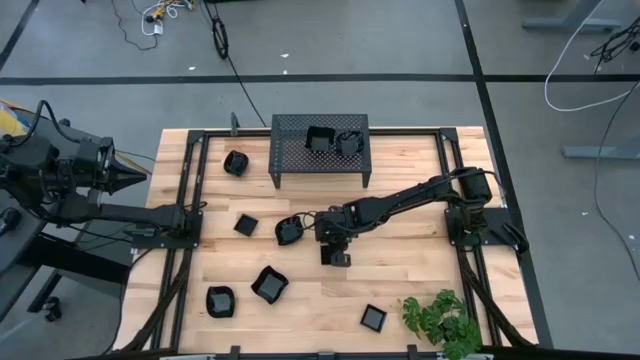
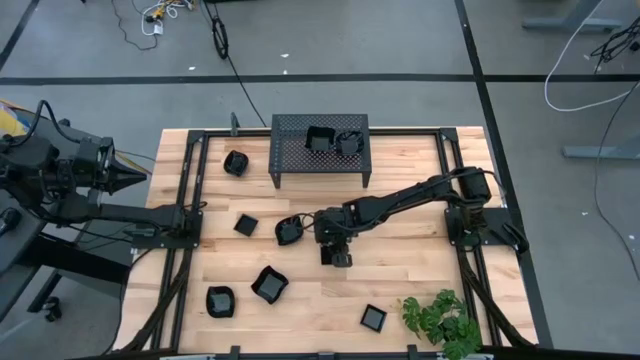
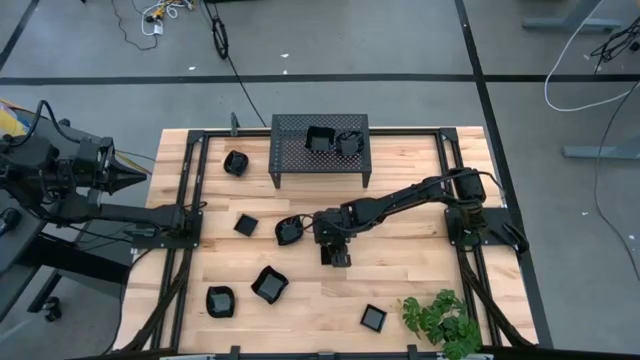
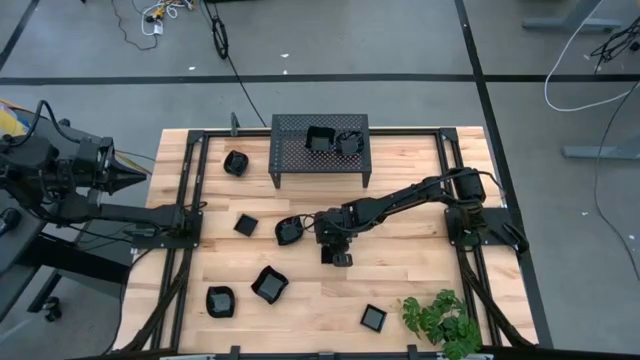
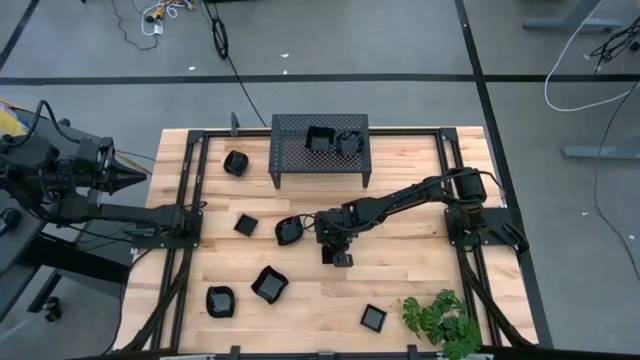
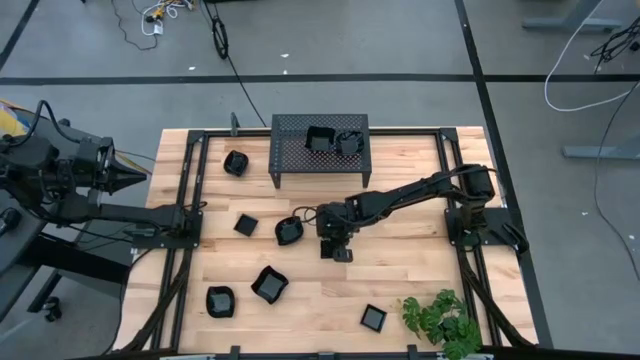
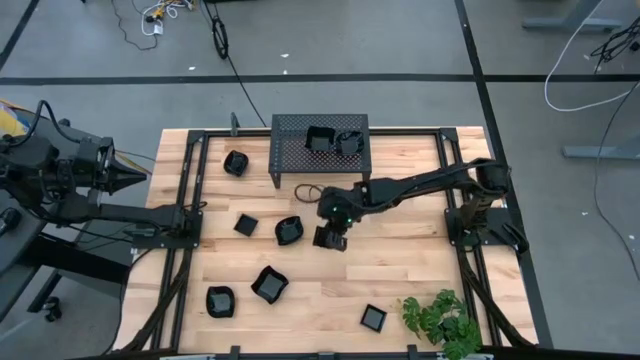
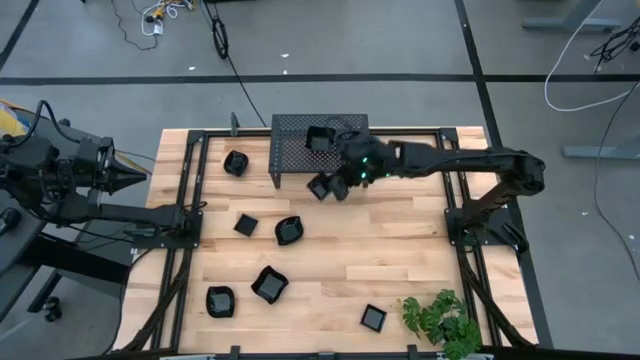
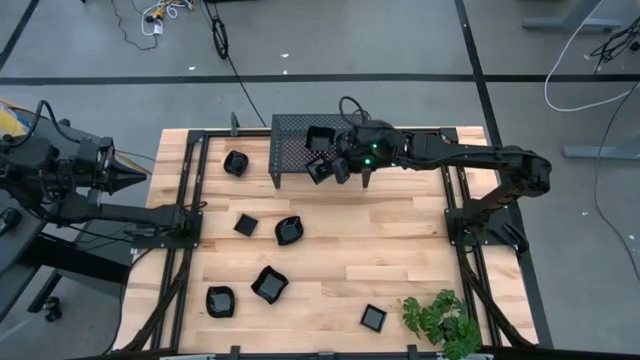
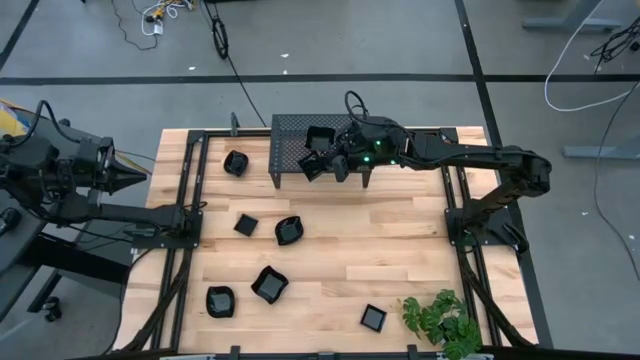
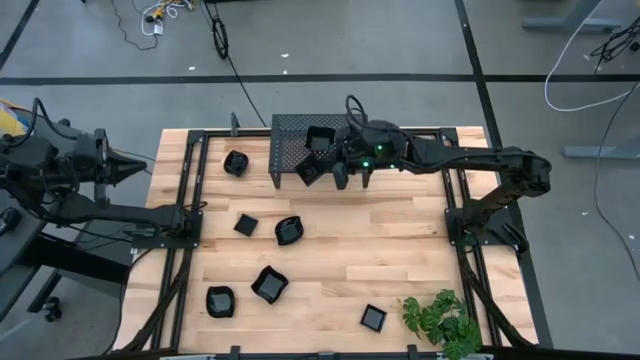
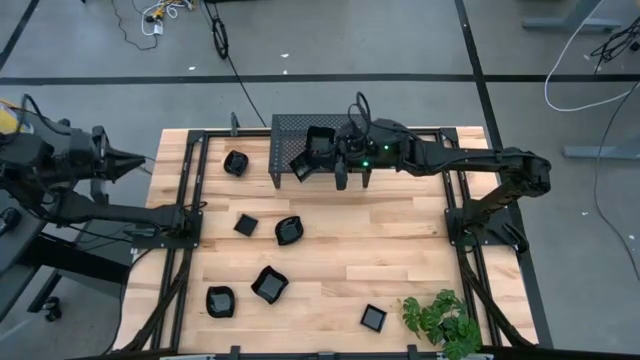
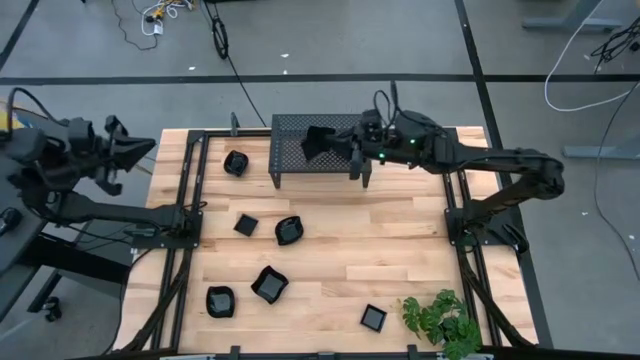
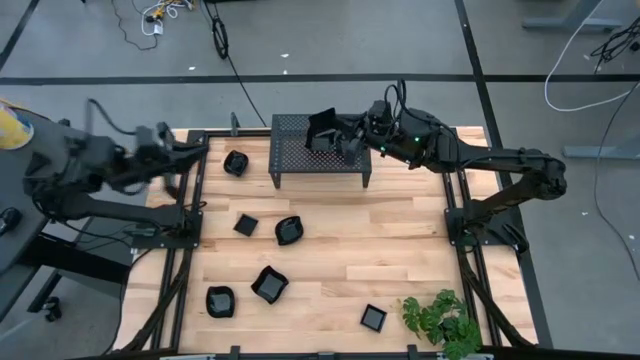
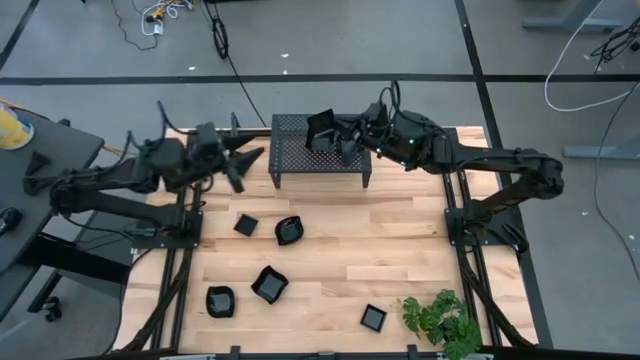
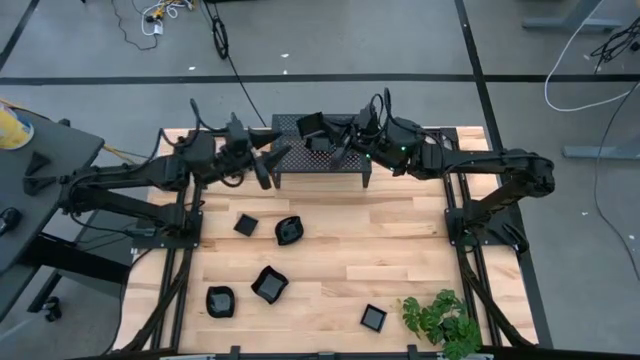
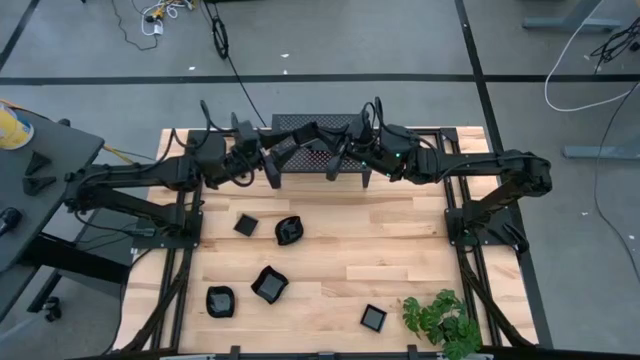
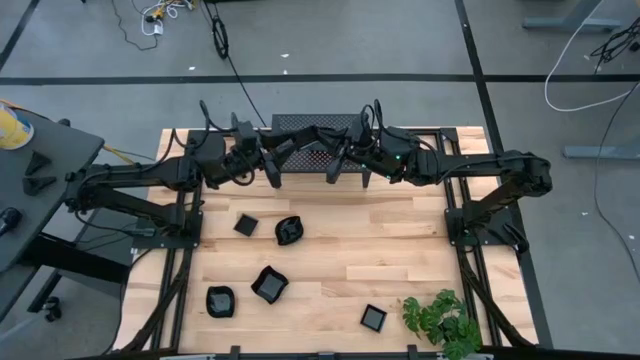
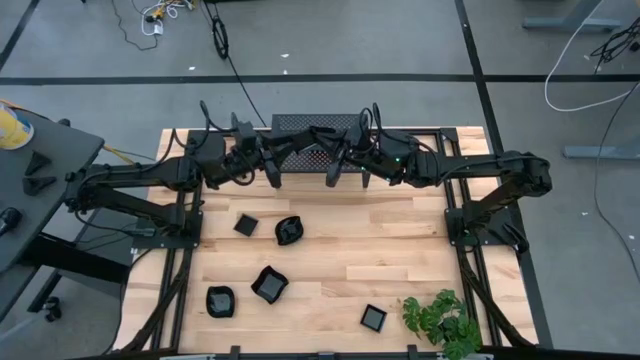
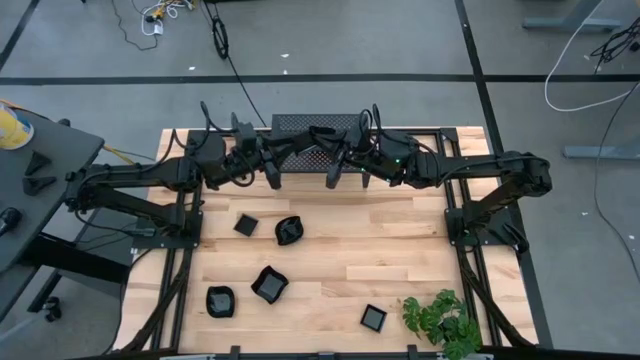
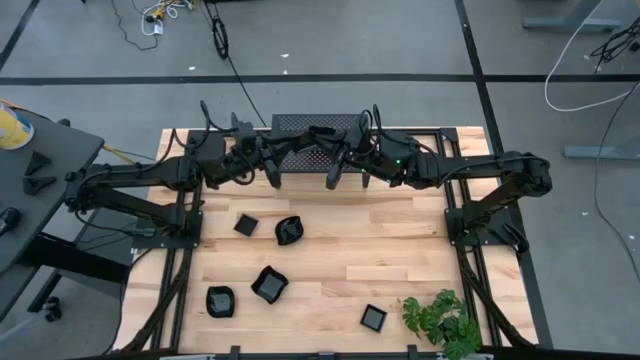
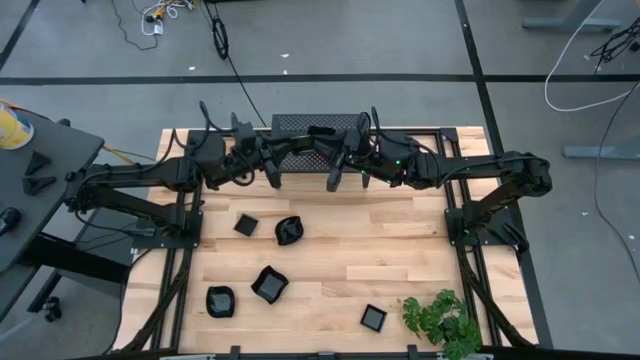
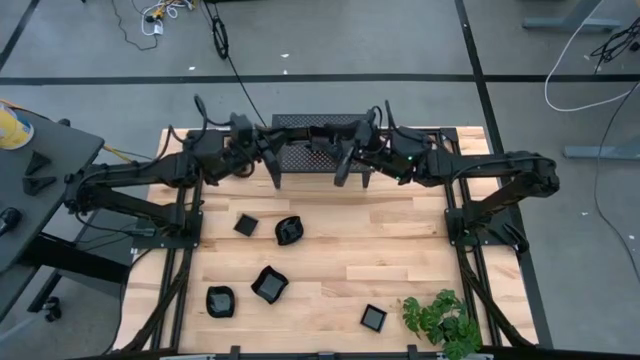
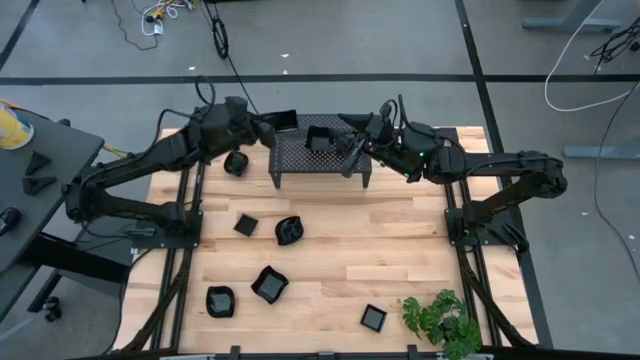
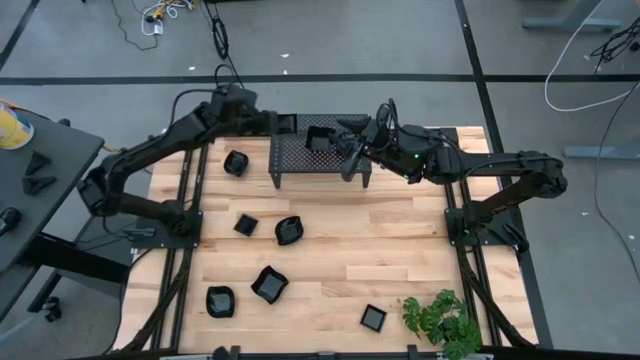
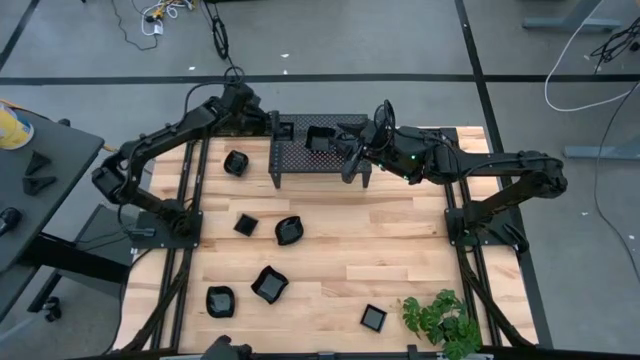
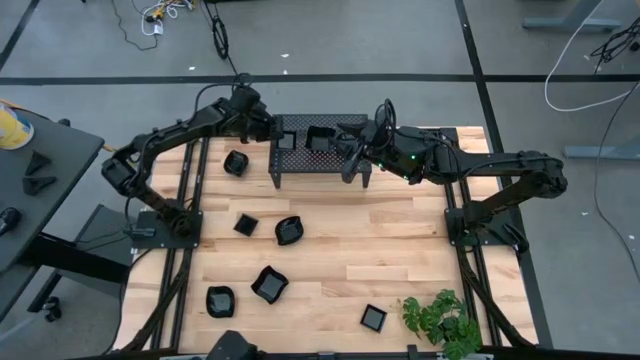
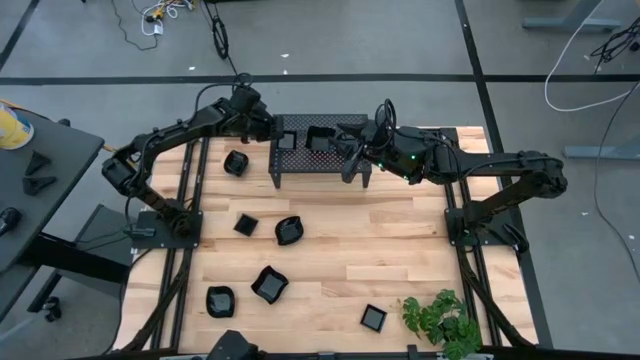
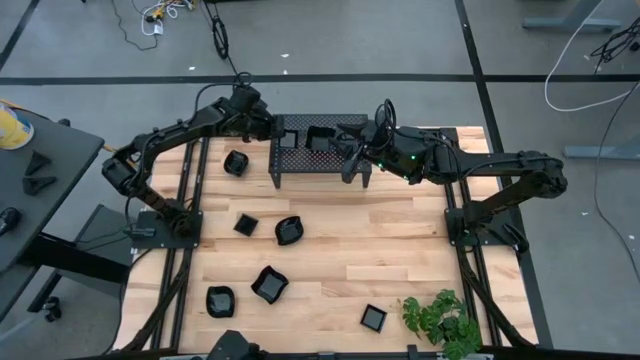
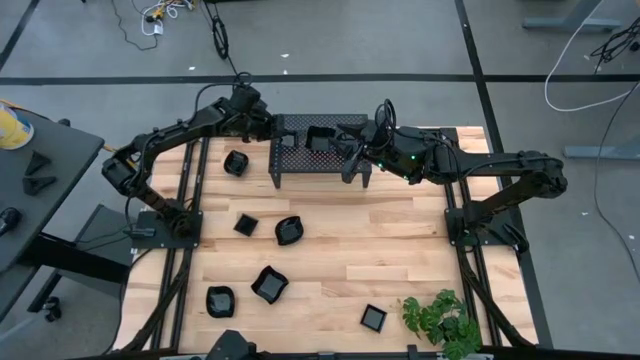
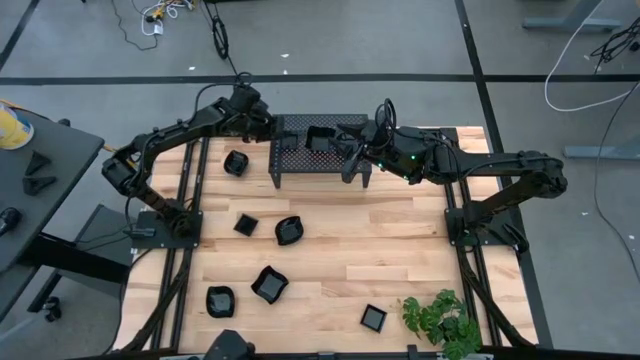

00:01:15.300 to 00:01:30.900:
Task: Pick & Place Mini shaped plates
Put the square plate on the shelf

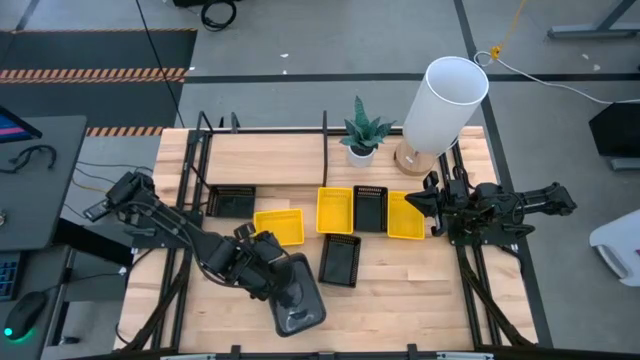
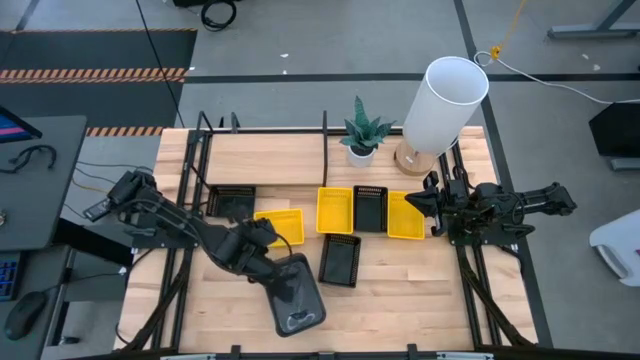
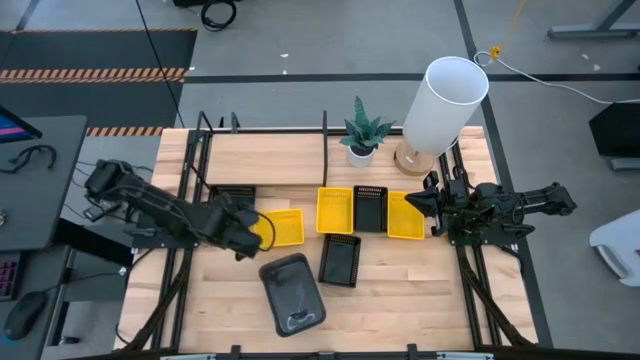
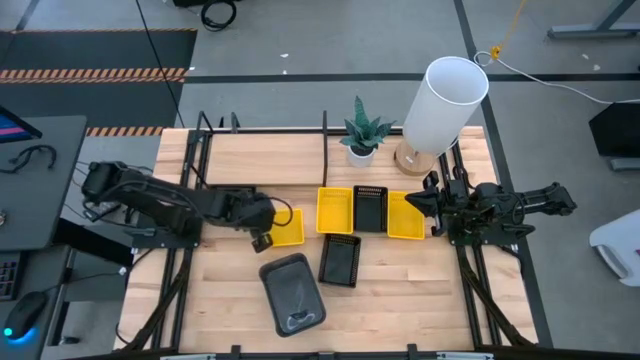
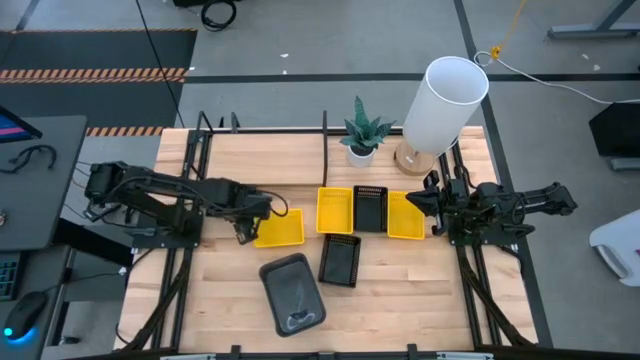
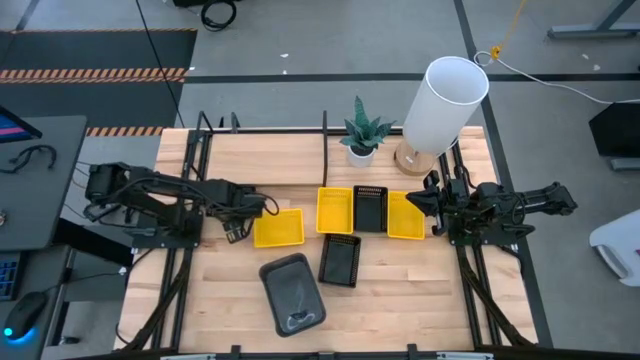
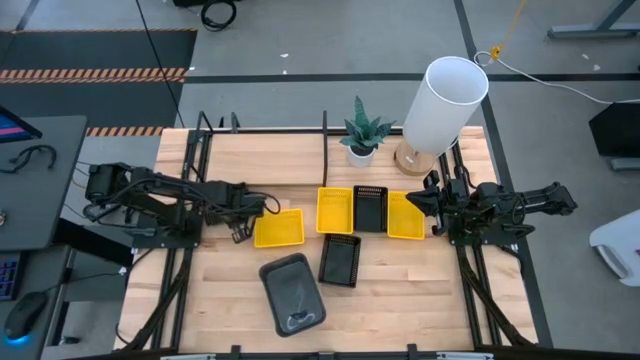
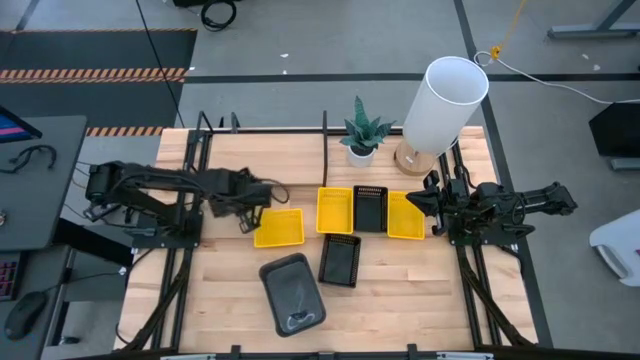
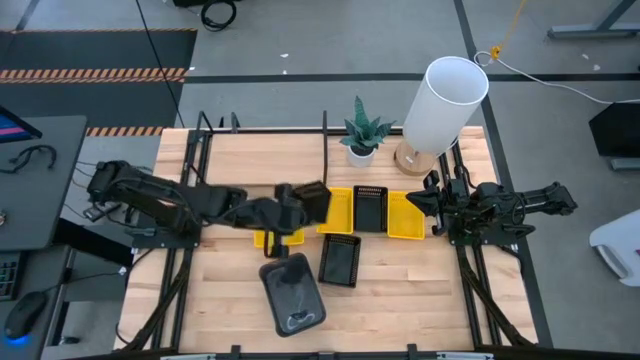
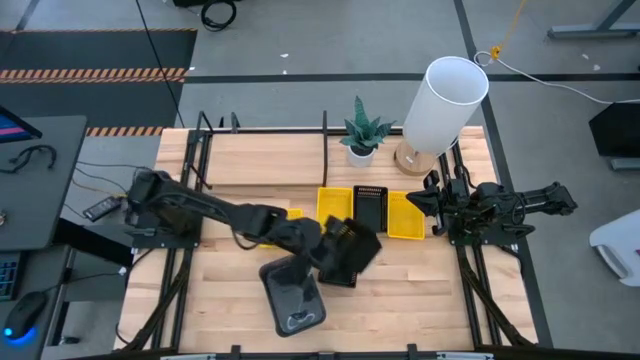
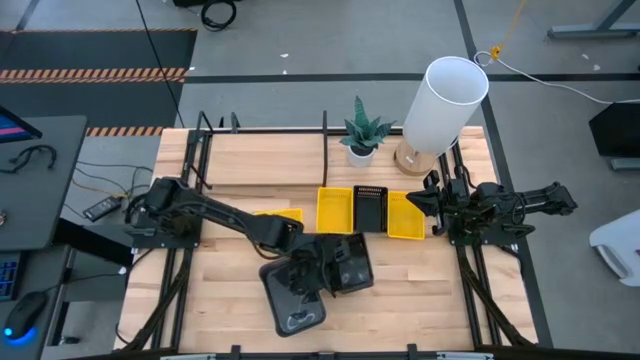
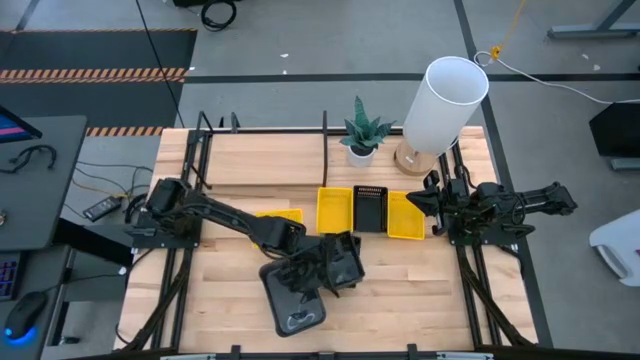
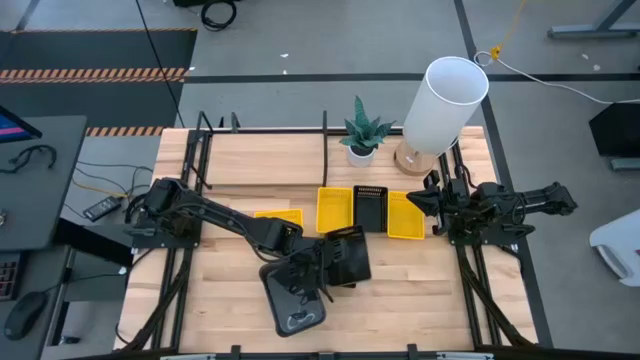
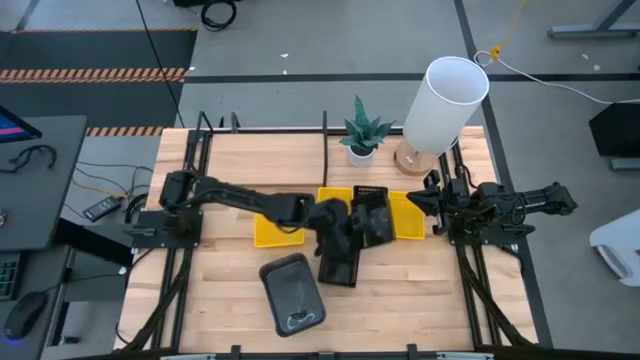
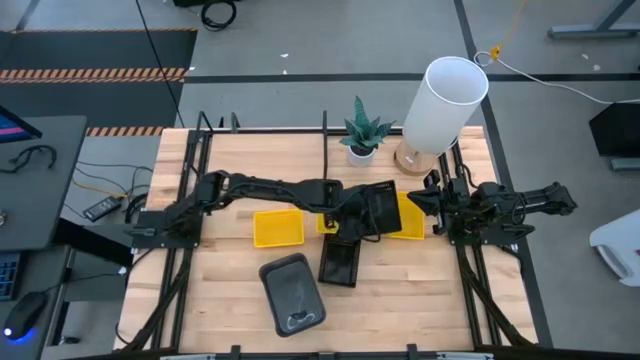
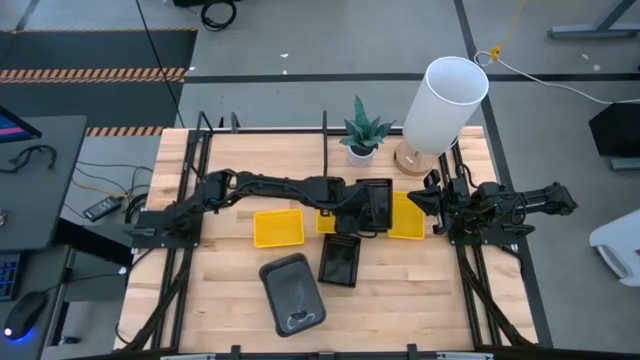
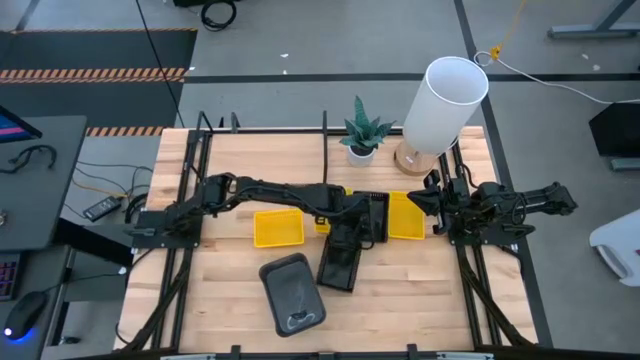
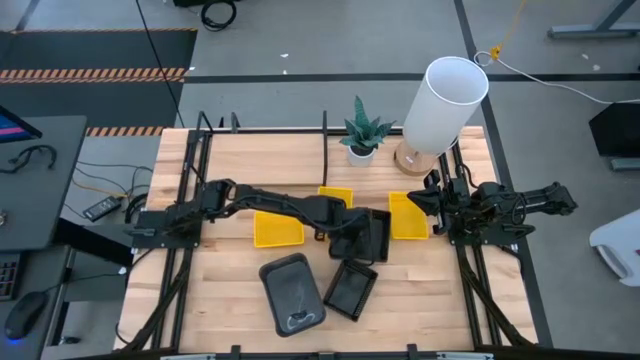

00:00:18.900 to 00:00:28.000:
Task: Stack baskets on shelf by color
Stack the left black bin on the top right black bin
